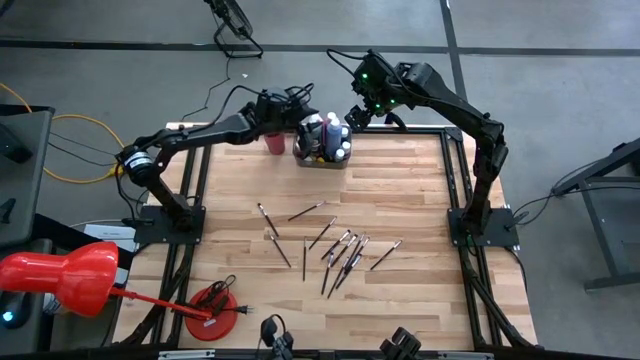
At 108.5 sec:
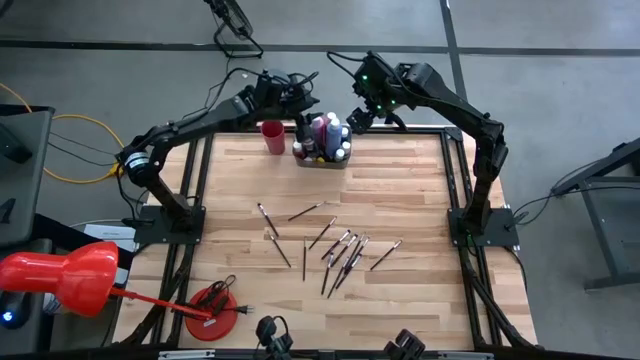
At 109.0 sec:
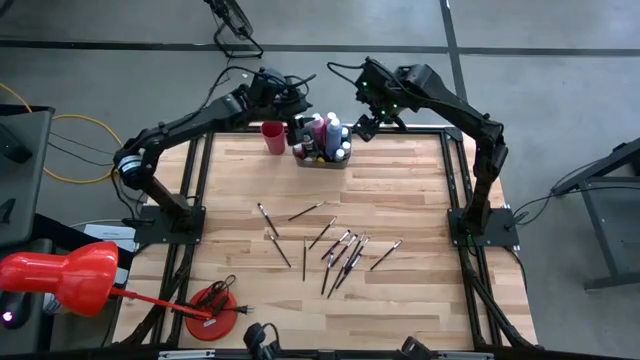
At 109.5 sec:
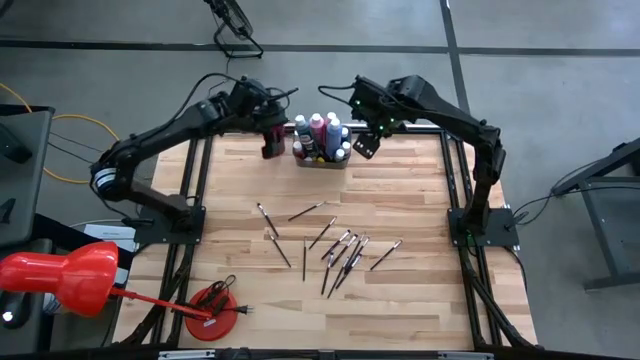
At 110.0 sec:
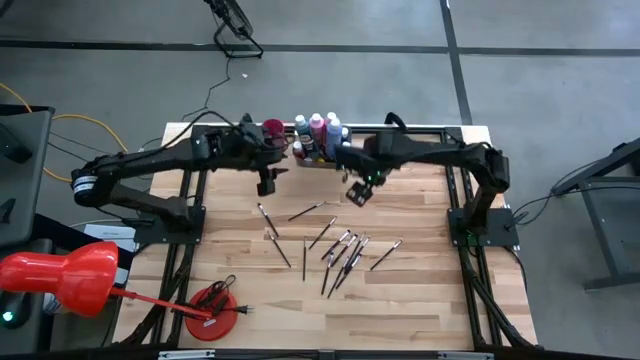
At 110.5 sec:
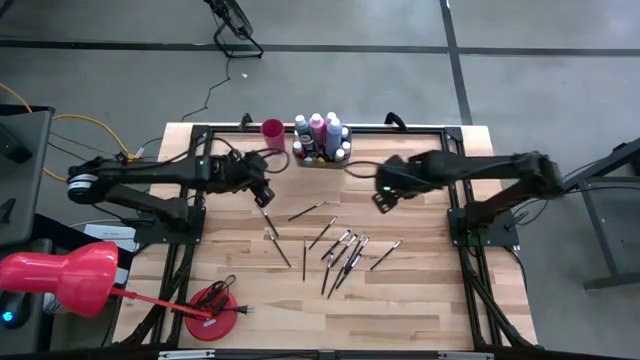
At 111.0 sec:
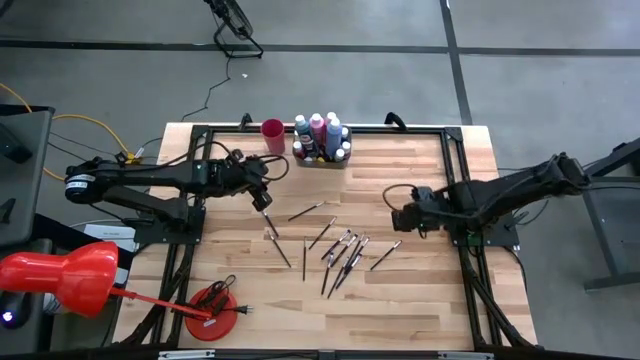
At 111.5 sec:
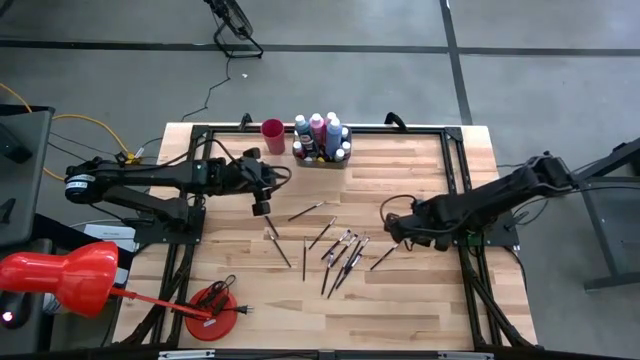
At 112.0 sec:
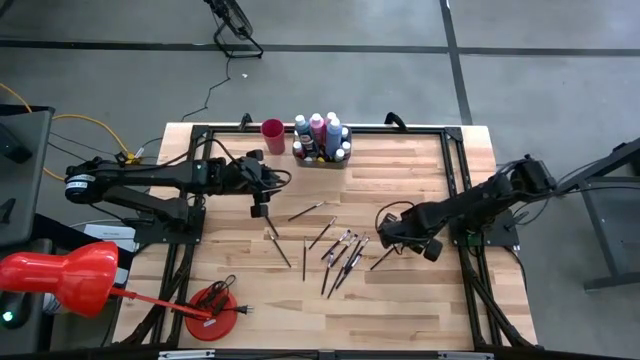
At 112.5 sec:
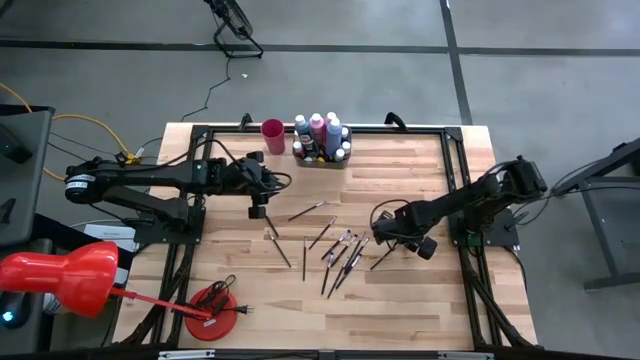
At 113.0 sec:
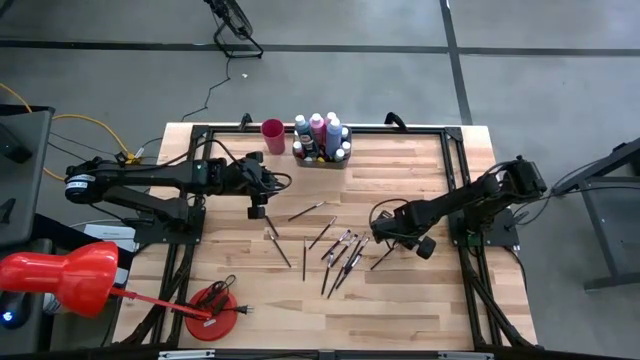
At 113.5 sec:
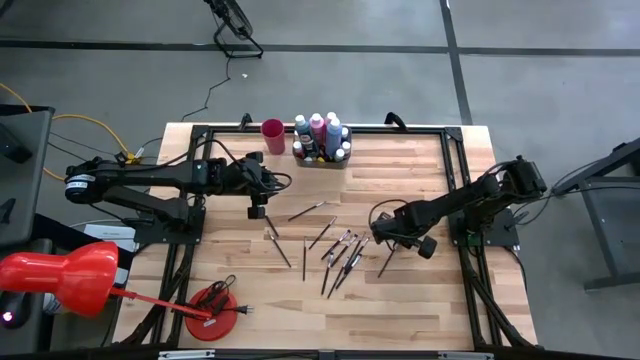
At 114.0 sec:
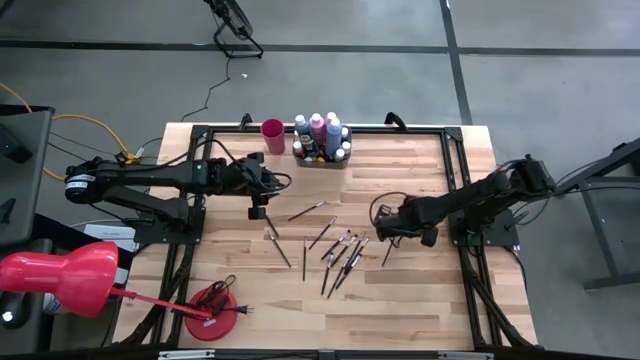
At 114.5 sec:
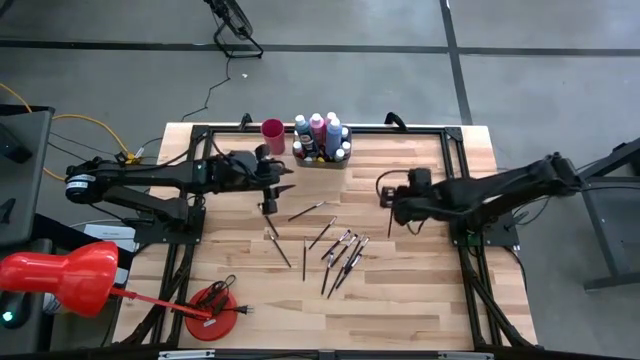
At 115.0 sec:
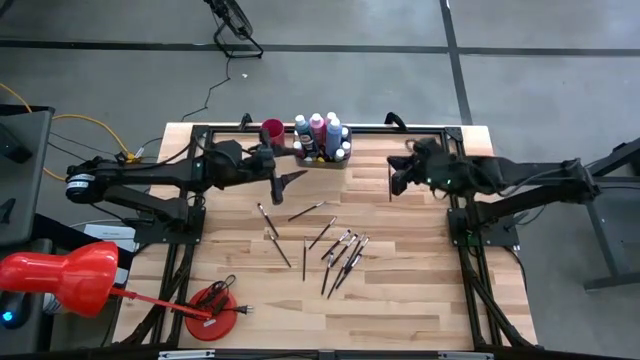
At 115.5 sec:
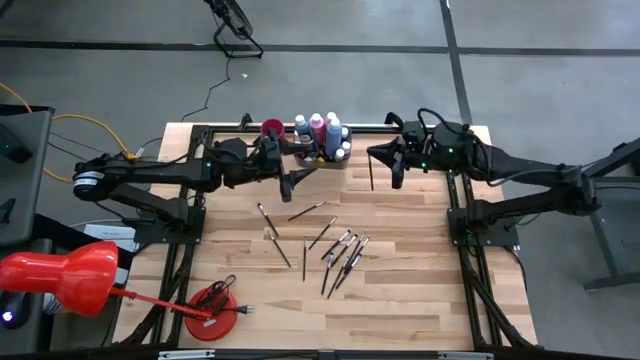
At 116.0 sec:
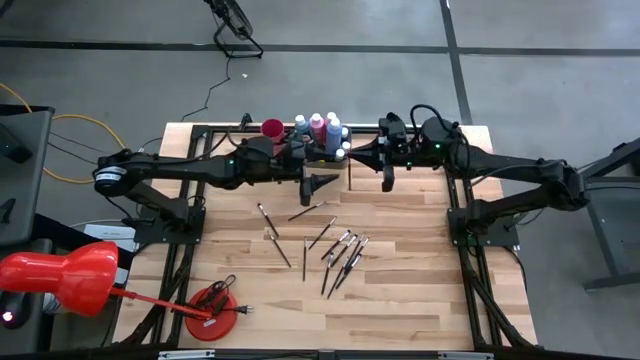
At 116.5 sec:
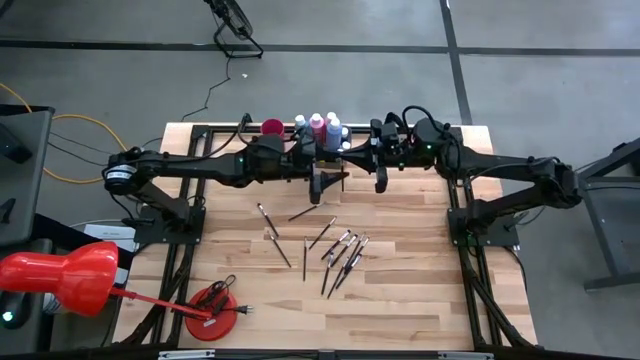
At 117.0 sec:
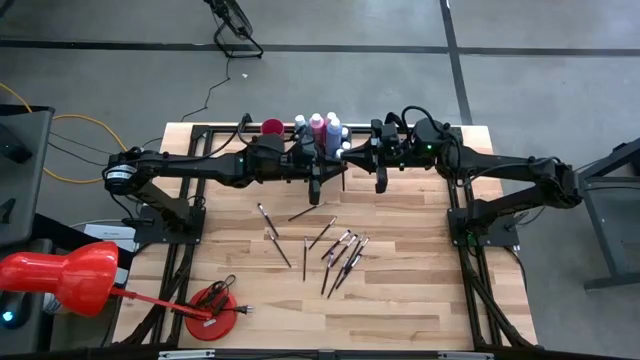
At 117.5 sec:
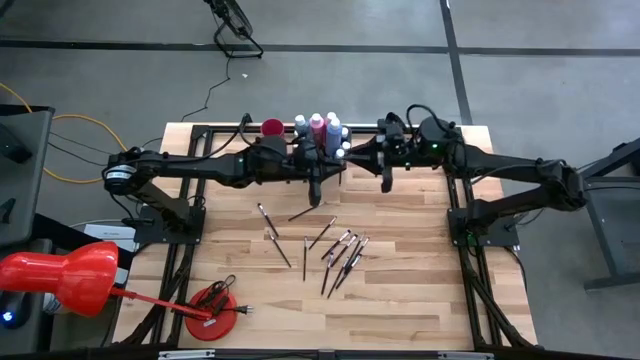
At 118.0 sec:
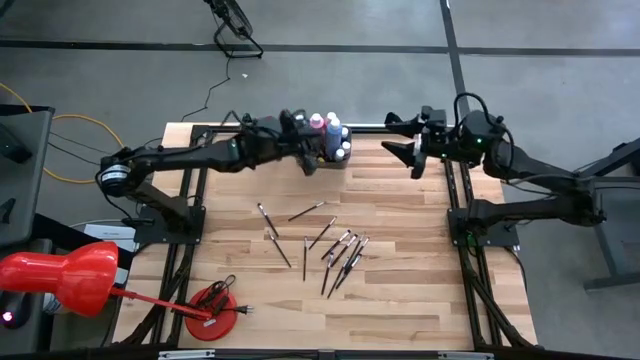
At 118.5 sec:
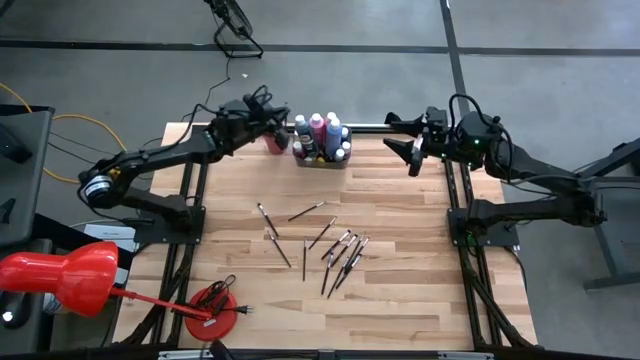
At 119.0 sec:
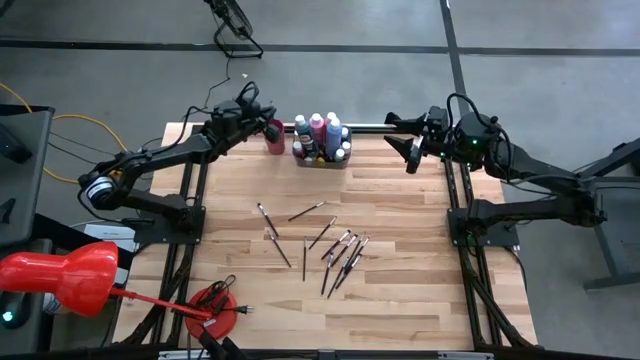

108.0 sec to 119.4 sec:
Task: Pick & Place Paint Supplies
Put the black paint brush into the pink cup

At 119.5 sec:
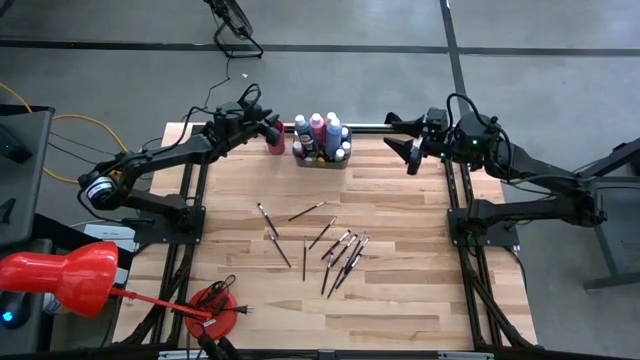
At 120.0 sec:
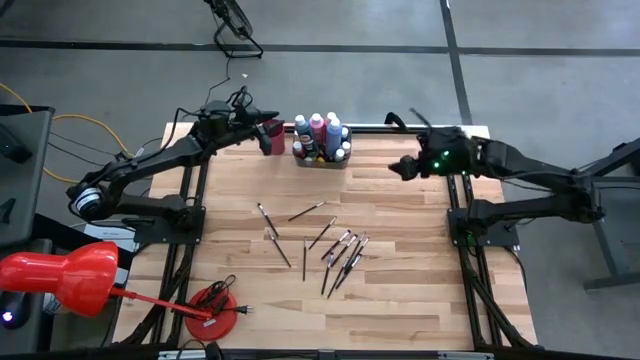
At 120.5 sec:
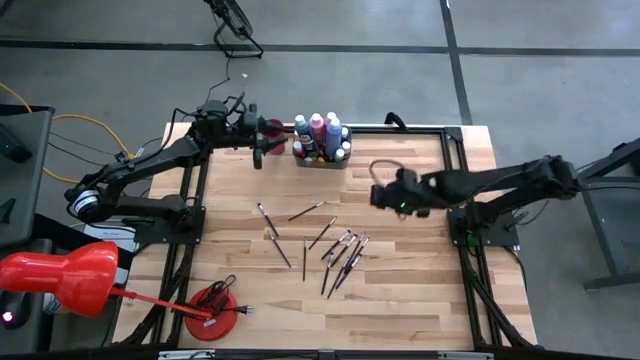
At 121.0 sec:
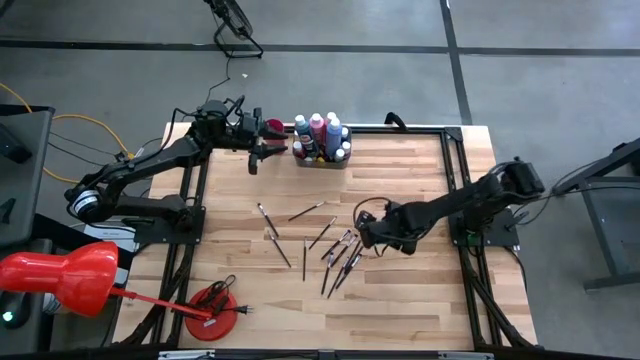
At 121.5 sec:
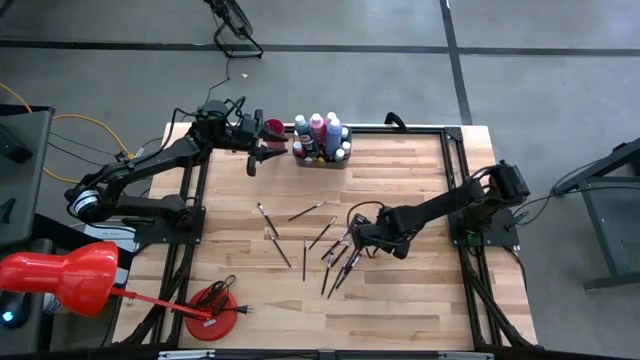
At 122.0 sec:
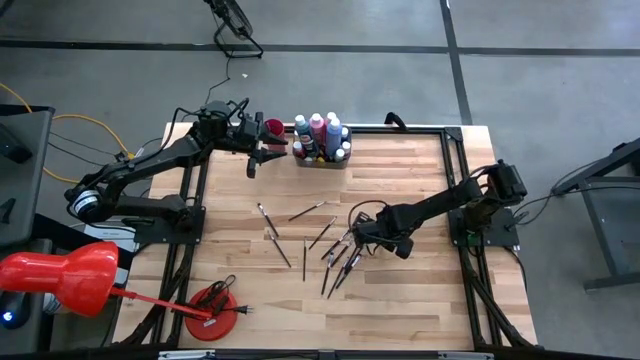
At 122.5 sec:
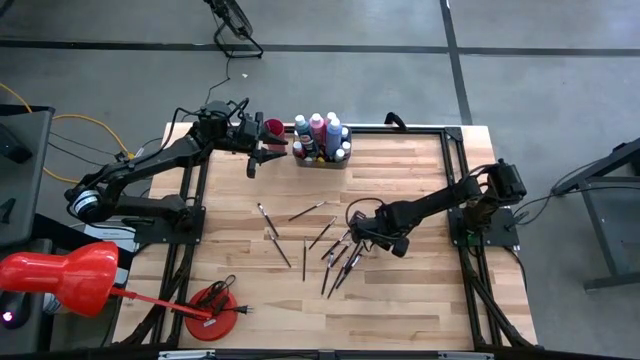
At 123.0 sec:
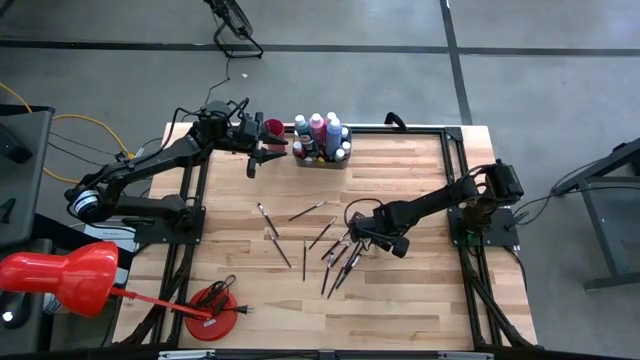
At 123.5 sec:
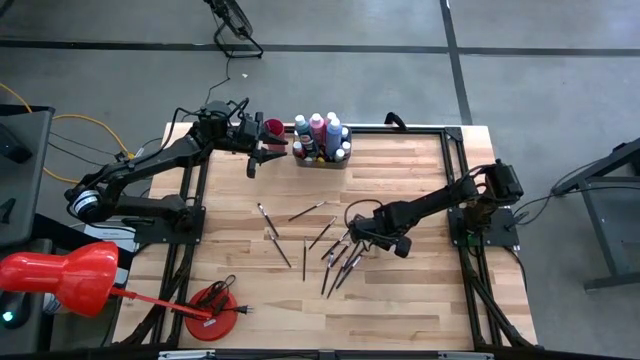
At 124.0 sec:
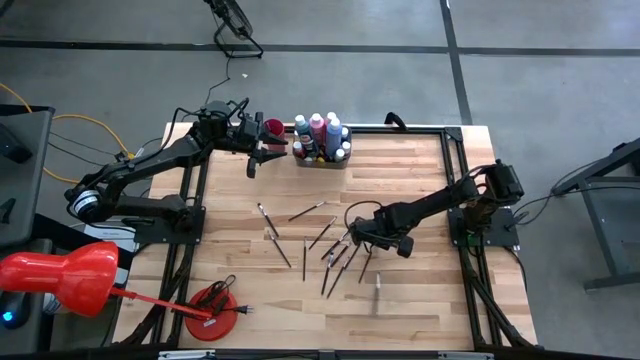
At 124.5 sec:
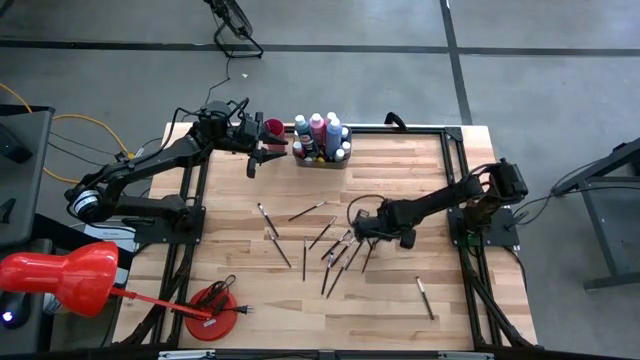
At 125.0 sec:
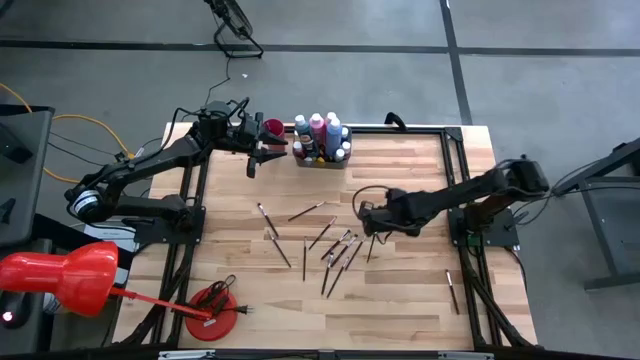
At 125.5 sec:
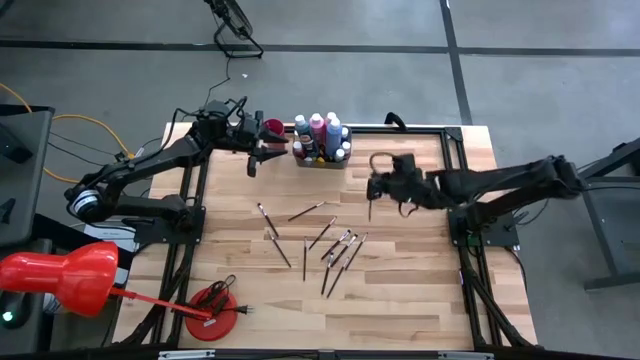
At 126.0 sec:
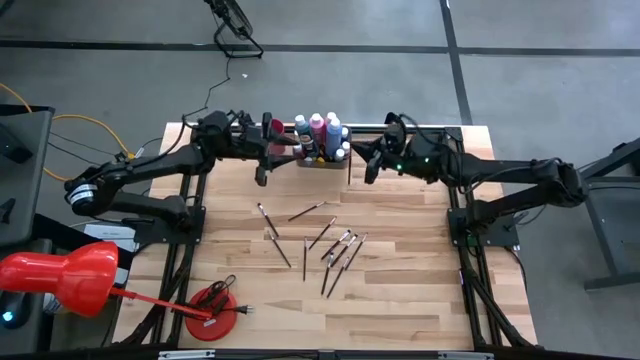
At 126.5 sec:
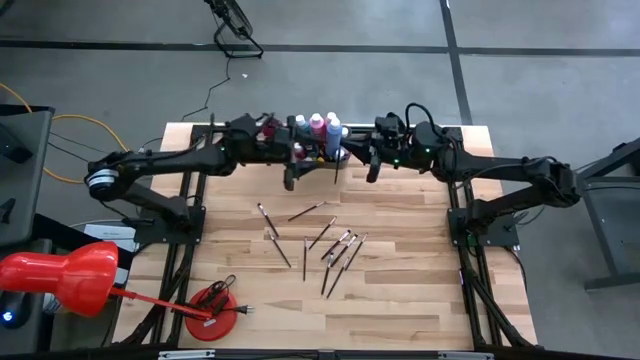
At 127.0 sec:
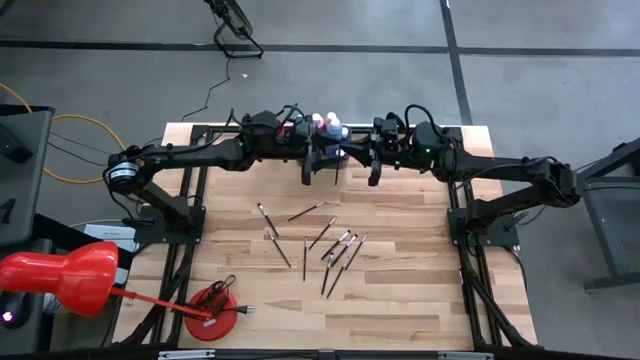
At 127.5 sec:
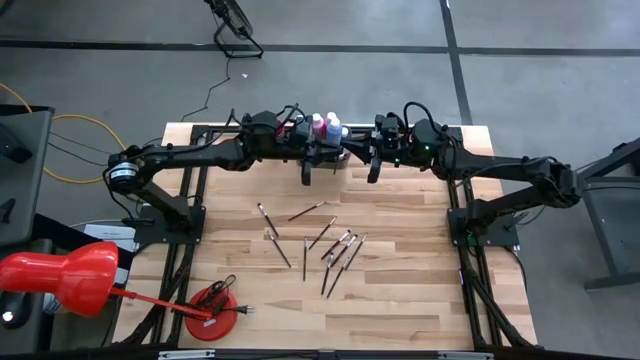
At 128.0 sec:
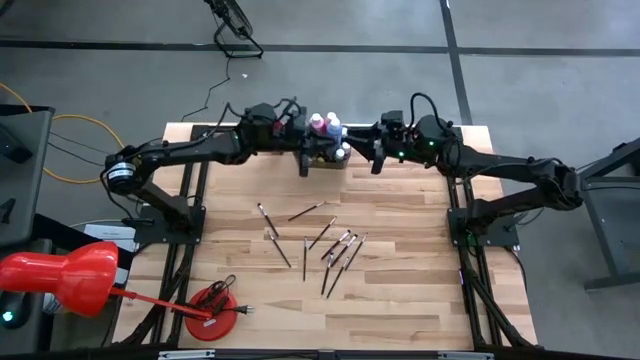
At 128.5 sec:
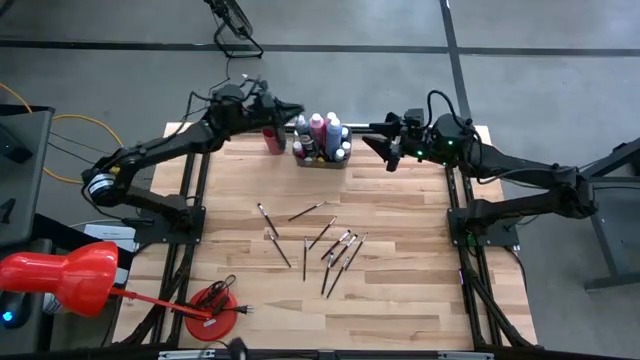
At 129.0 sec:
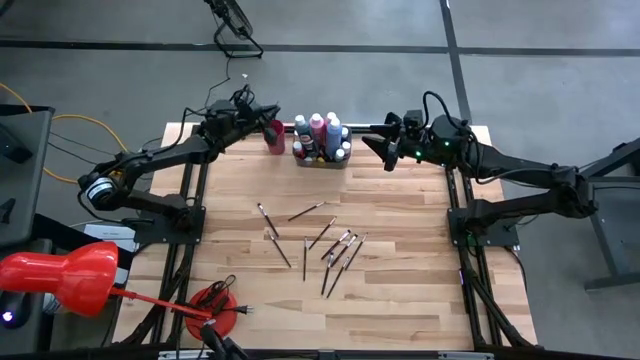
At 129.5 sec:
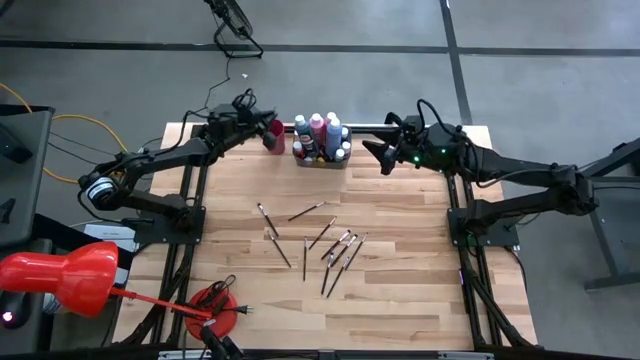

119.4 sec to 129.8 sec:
Put the black paint brush into the pink cup
